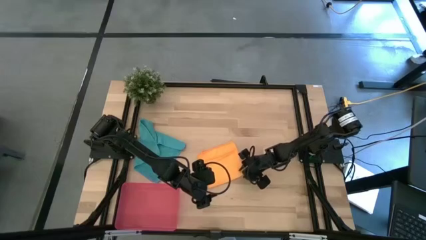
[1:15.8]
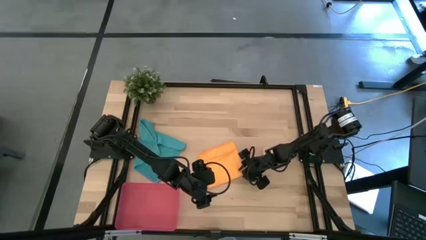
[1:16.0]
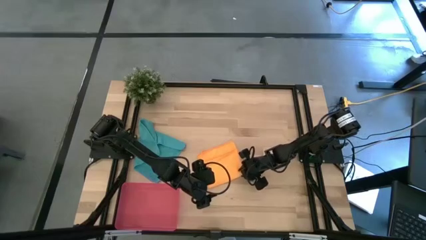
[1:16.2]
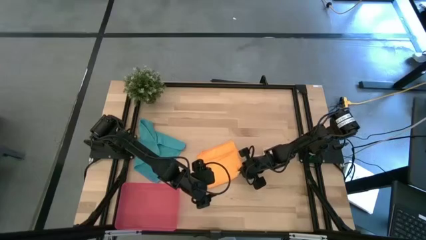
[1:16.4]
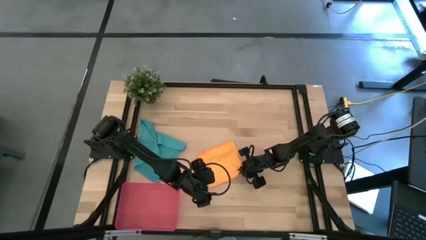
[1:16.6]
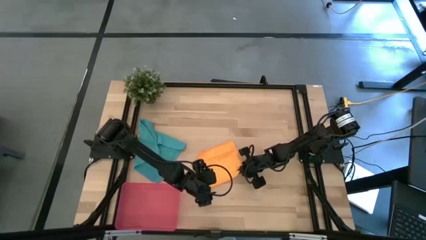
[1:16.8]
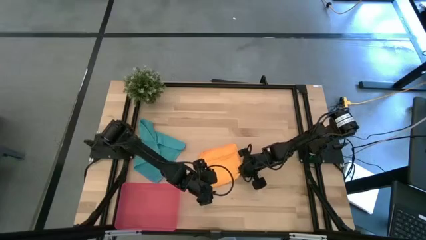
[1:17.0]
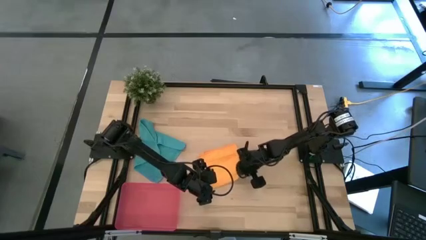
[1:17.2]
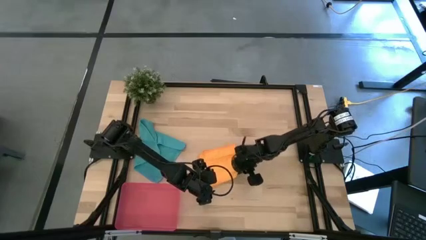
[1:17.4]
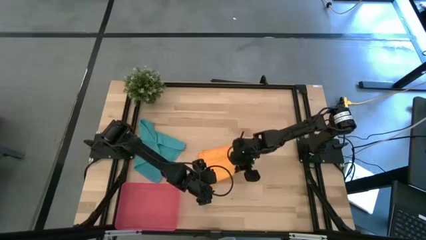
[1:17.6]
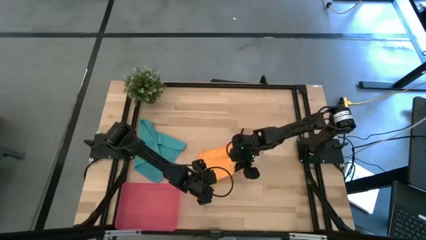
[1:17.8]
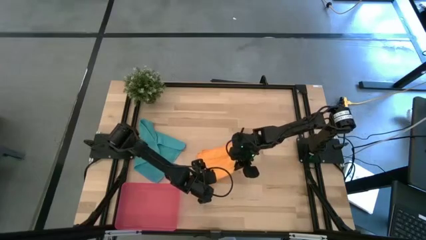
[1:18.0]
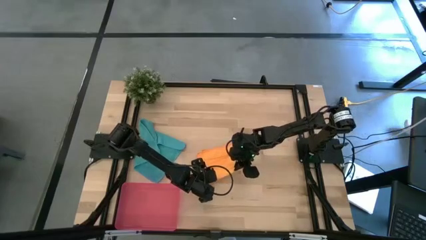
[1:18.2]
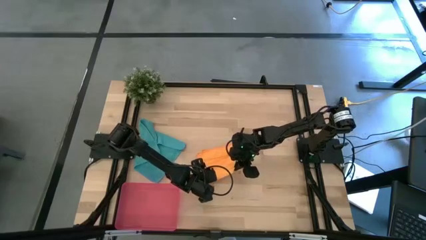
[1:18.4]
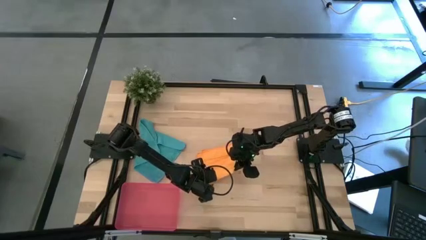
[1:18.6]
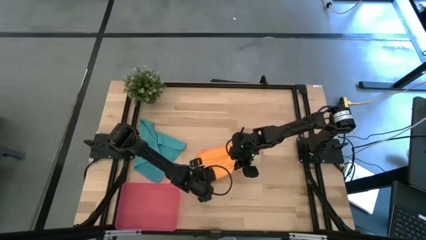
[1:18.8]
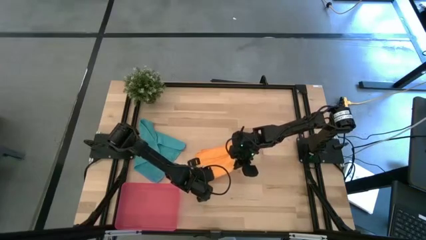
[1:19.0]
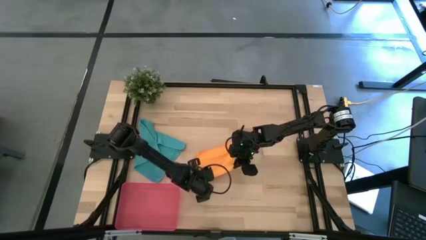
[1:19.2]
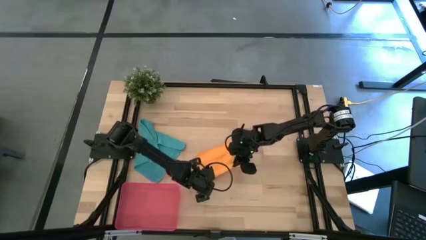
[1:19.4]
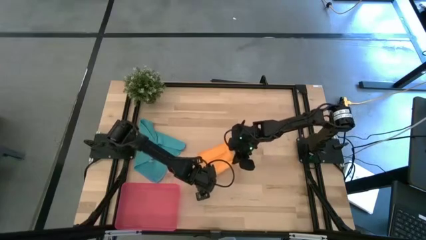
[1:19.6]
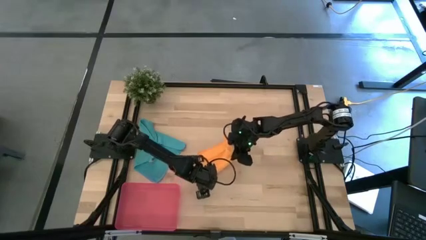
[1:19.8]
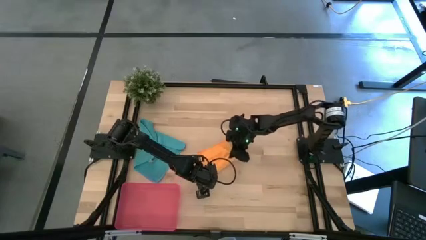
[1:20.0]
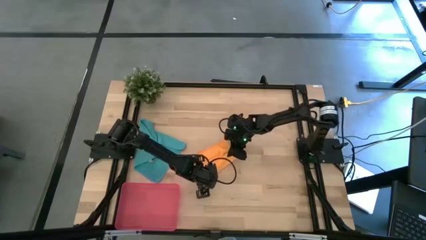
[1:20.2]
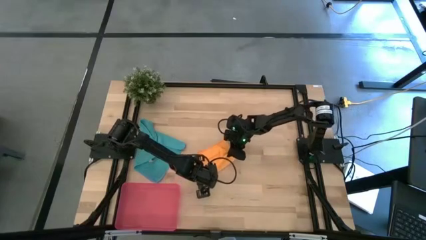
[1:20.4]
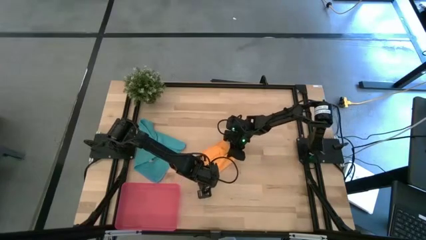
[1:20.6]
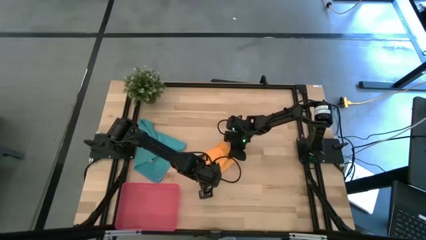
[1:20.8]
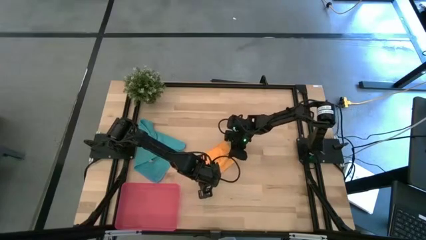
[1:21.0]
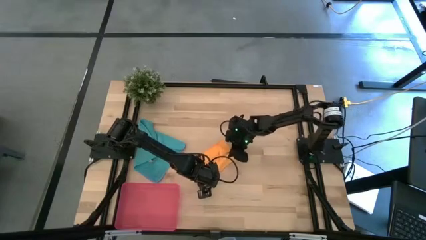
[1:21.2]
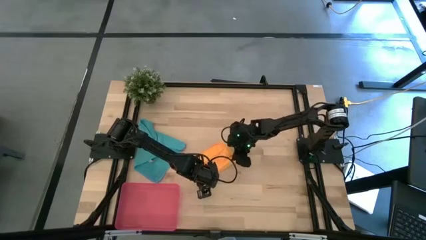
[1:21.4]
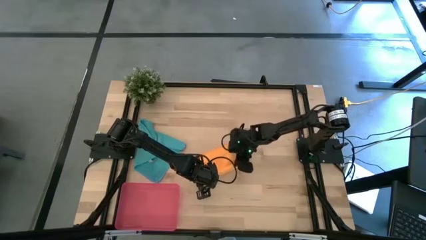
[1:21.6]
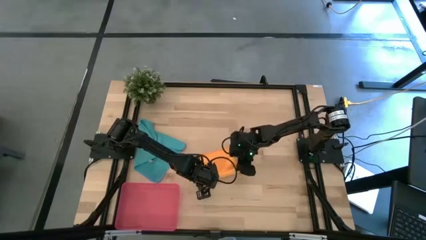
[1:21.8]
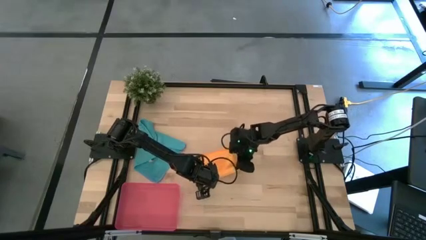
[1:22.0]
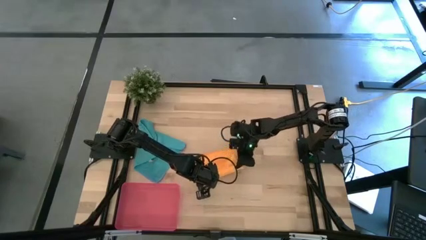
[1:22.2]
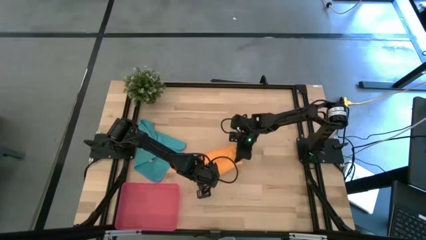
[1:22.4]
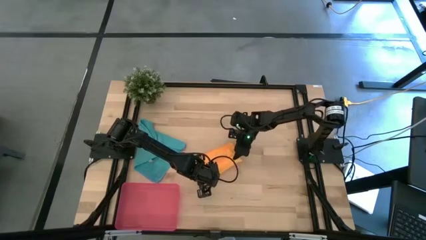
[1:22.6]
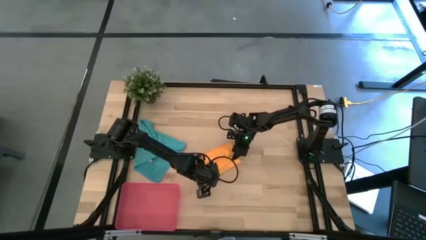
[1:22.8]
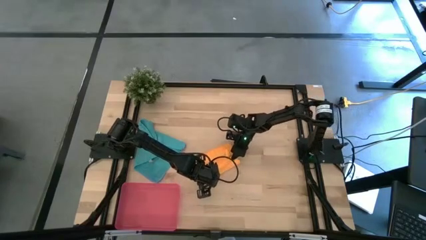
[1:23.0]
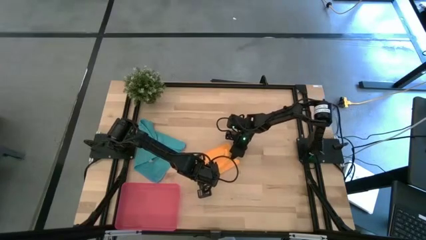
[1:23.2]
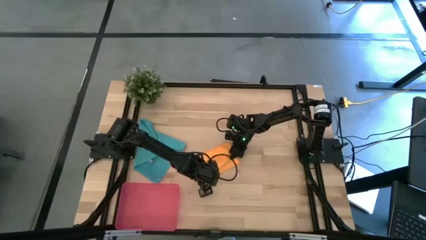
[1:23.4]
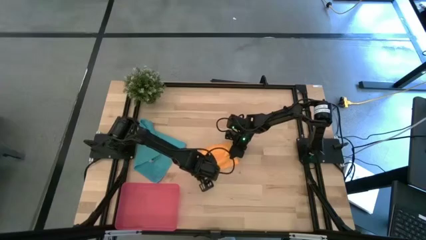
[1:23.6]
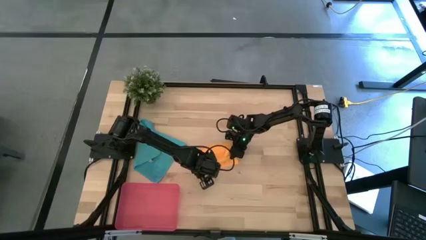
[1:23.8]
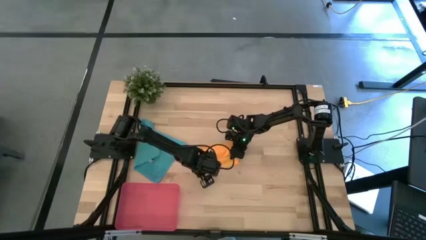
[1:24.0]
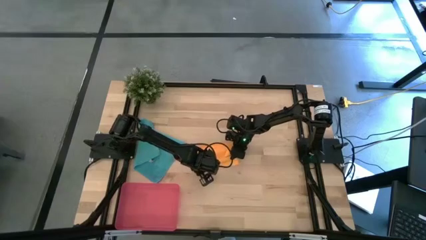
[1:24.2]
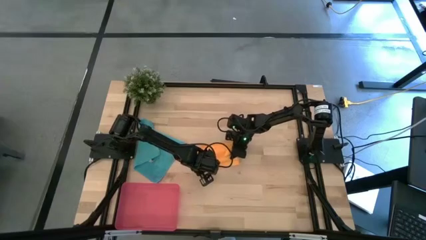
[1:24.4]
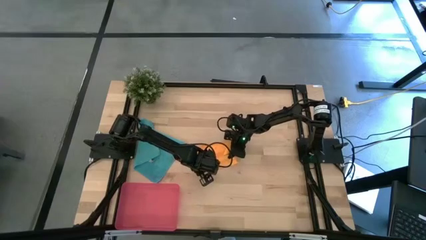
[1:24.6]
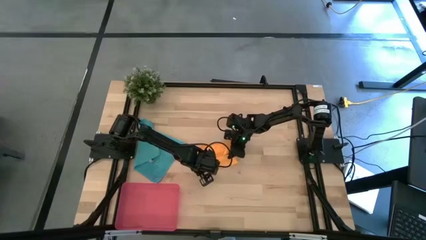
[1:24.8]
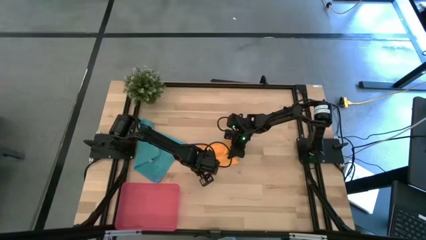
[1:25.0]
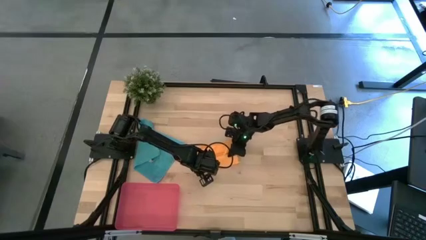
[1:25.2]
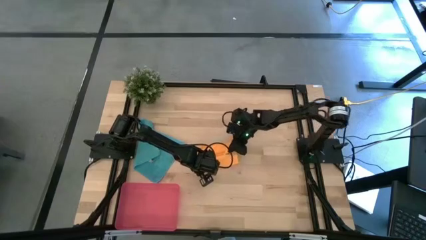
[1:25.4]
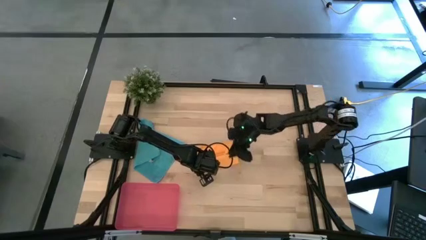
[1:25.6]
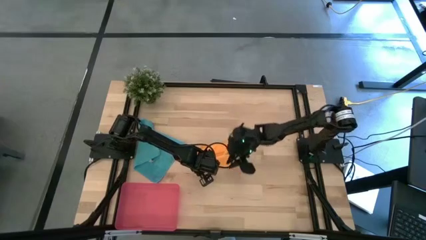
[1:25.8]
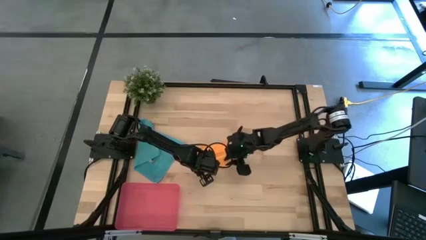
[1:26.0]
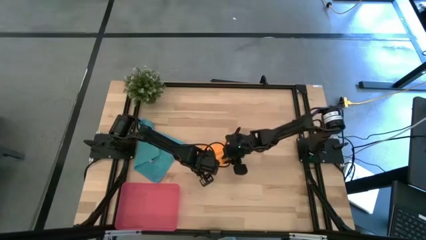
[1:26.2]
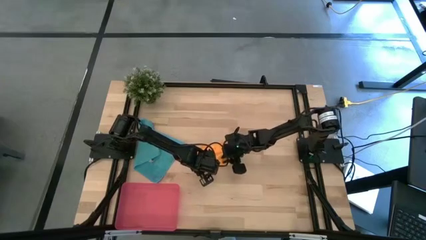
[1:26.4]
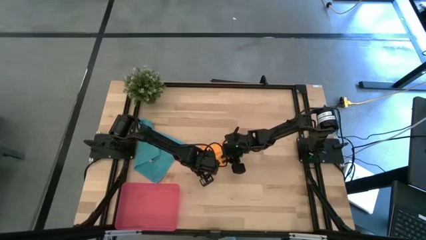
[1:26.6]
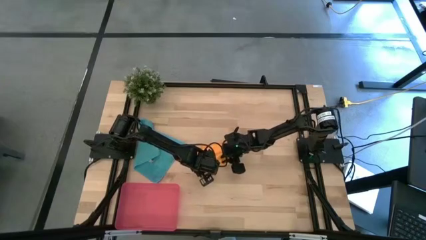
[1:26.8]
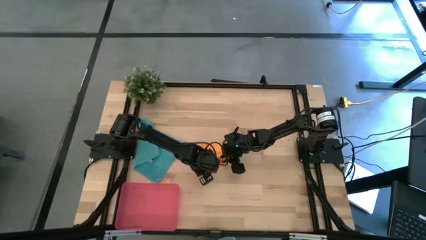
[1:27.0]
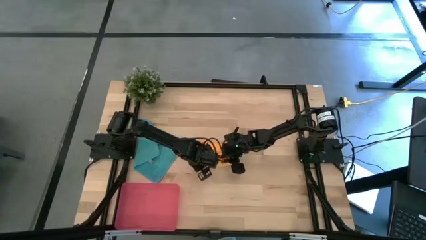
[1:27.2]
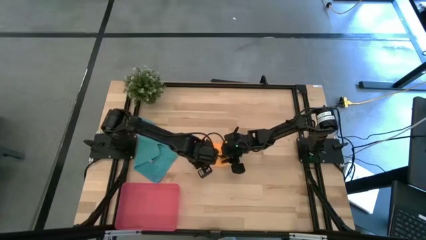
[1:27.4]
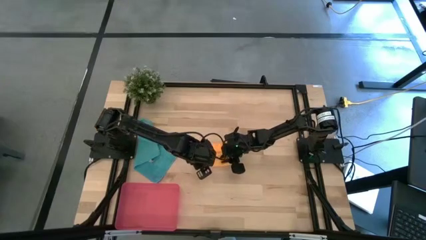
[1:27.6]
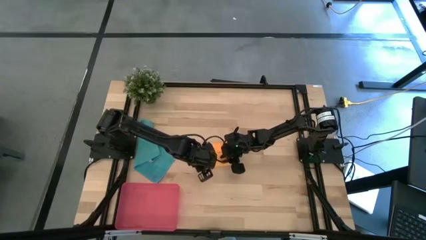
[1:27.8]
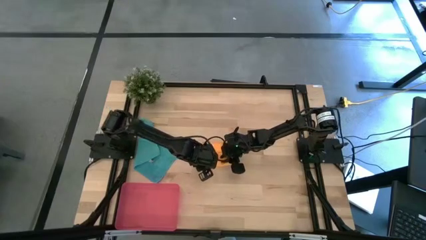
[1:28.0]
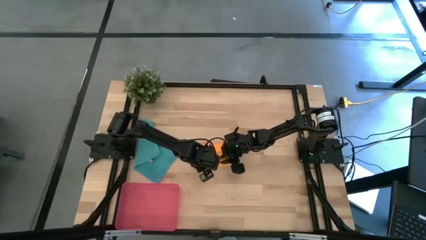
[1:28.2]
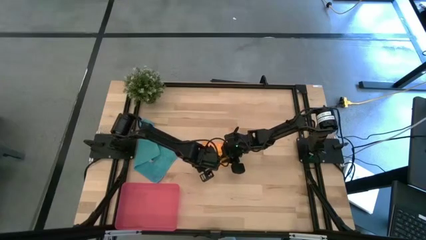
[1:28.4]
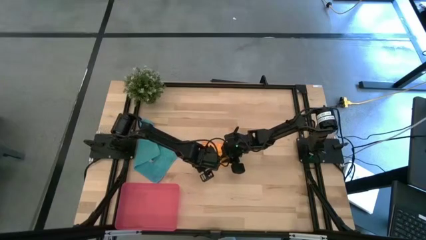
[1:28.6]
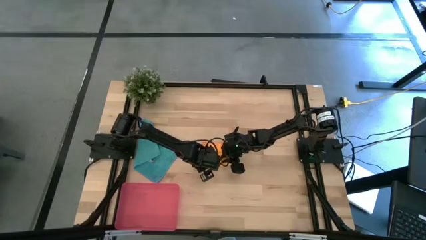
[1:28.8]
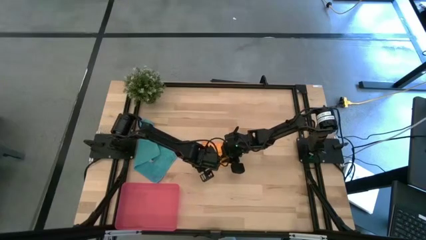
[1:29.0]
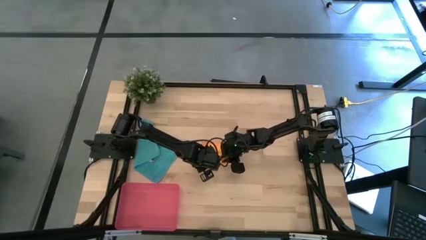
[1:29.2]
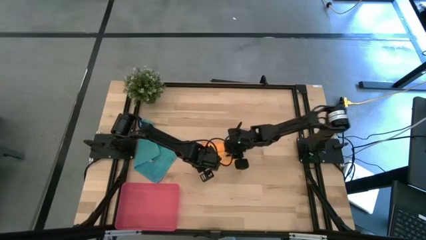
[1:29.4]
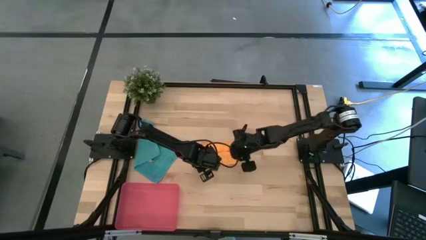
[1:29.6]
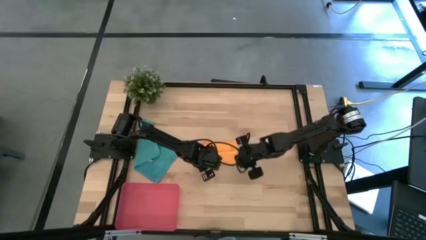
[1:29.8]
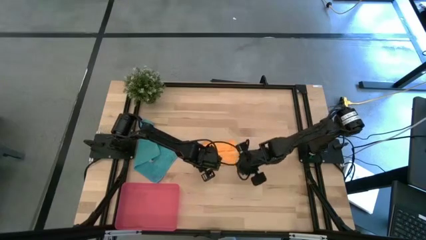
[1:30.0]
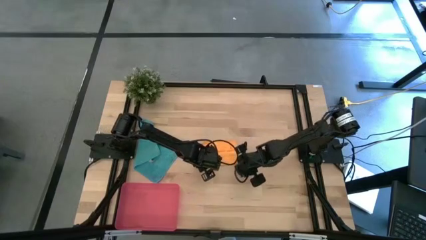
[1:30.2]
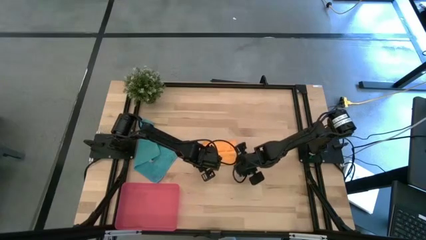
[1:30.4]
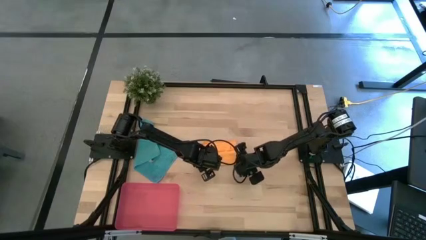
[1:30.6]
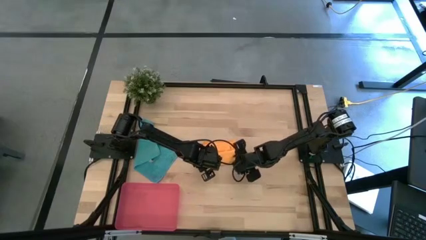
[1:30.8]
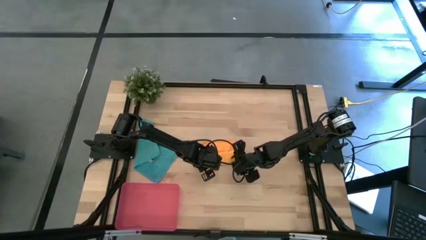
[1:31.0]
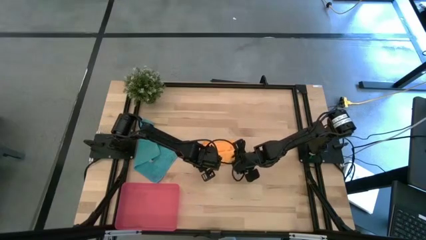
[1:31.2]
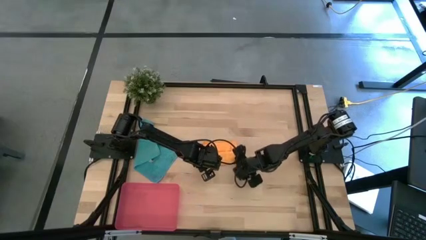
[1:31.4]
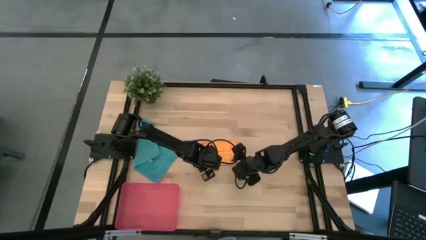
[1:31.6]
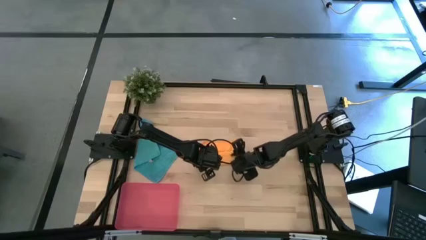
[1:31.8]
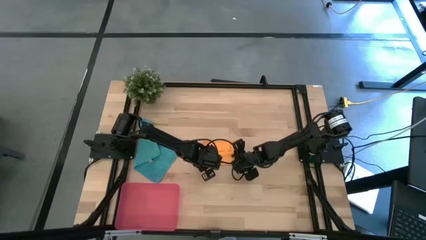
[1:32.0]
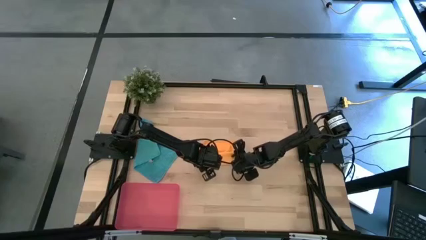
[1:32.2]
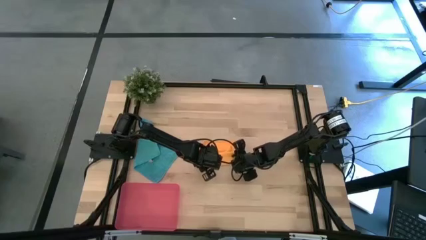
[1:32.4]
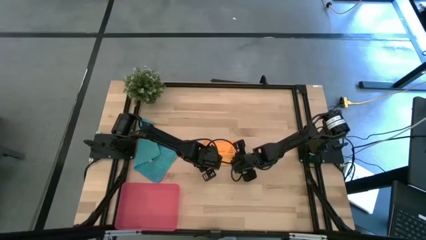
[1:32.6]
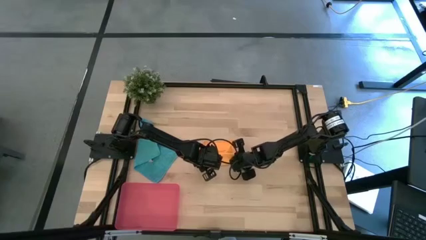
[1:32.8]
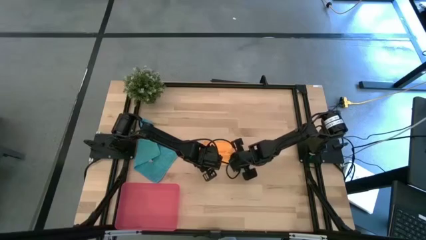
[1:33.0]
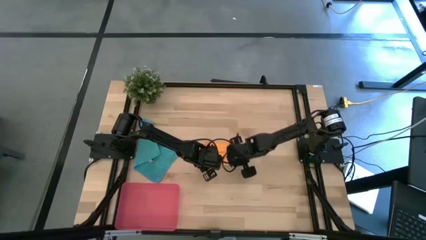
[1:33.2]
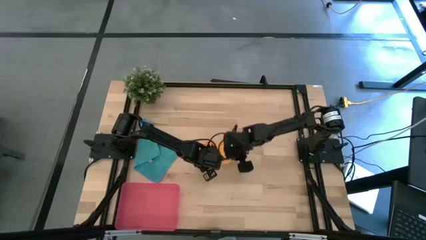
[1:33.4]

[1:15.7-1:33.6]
Task: Roll microfiber towels into tight, uniform cylinder then place into a basket
Roll the yellow microfiber cloth
